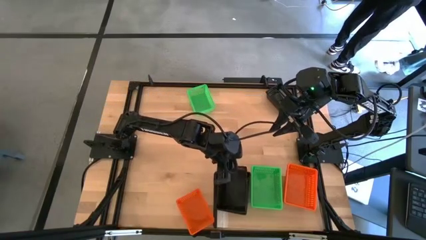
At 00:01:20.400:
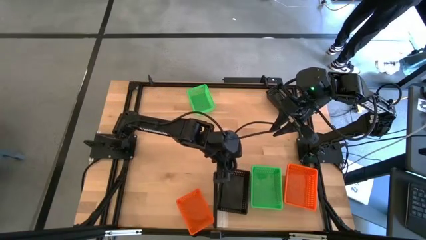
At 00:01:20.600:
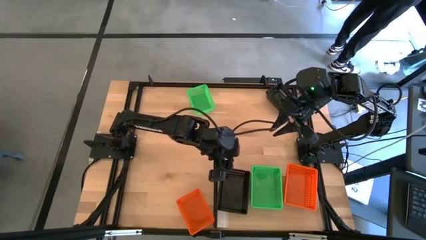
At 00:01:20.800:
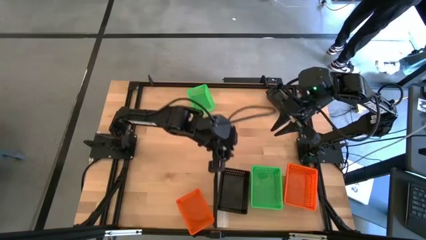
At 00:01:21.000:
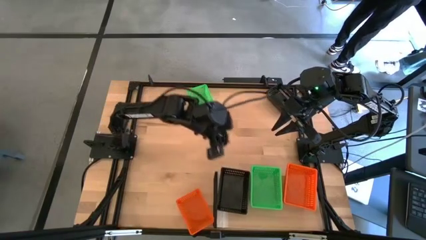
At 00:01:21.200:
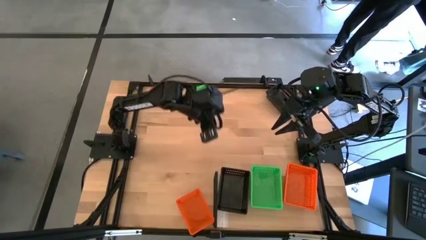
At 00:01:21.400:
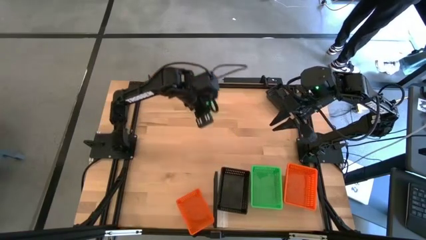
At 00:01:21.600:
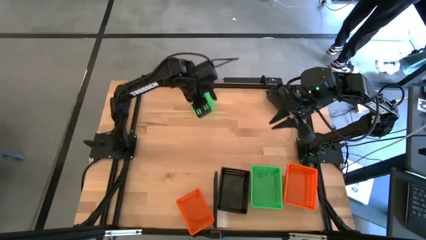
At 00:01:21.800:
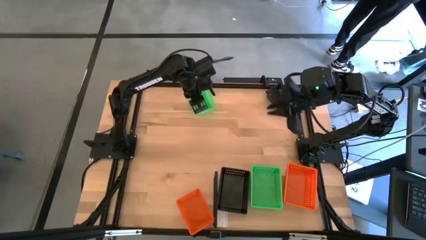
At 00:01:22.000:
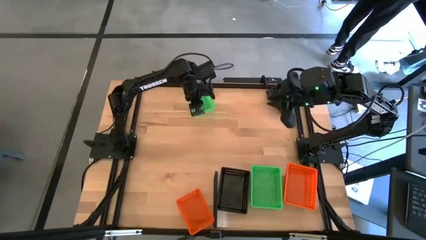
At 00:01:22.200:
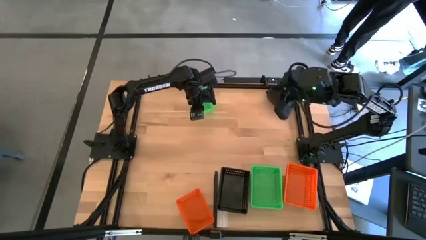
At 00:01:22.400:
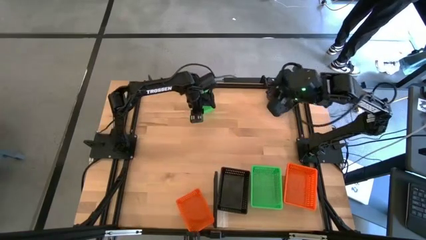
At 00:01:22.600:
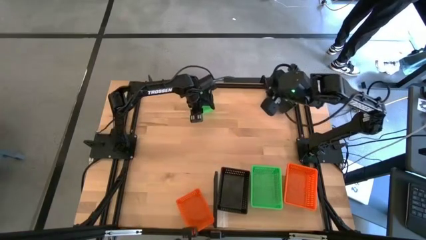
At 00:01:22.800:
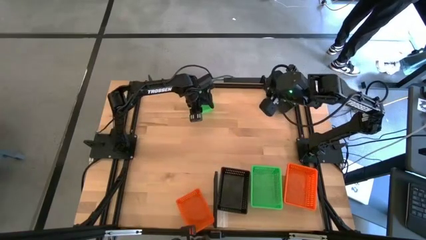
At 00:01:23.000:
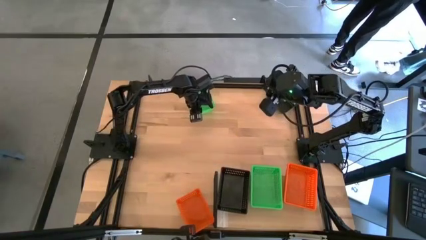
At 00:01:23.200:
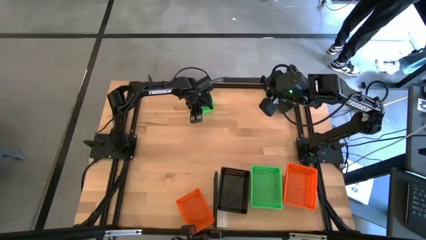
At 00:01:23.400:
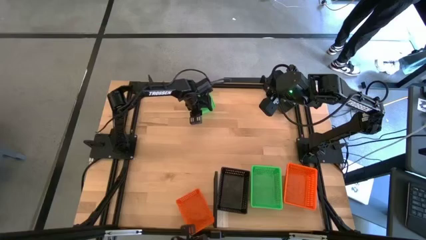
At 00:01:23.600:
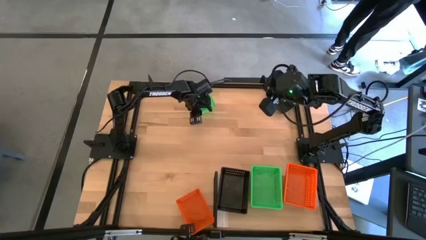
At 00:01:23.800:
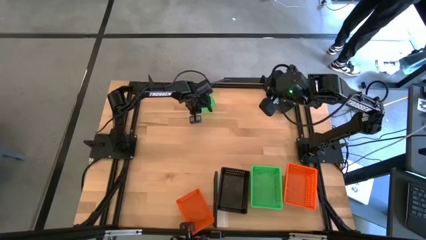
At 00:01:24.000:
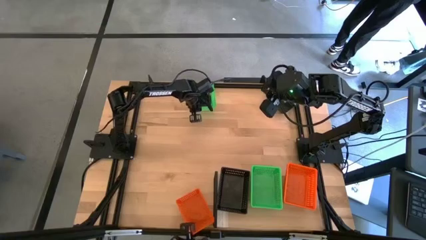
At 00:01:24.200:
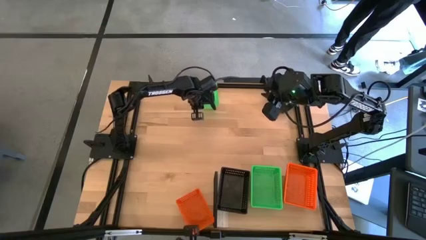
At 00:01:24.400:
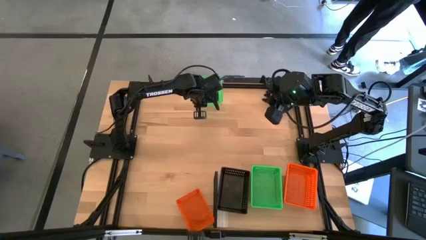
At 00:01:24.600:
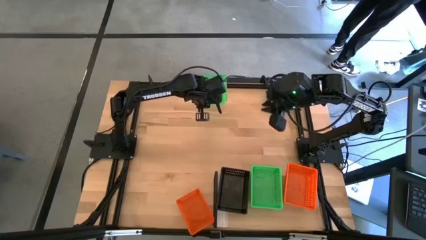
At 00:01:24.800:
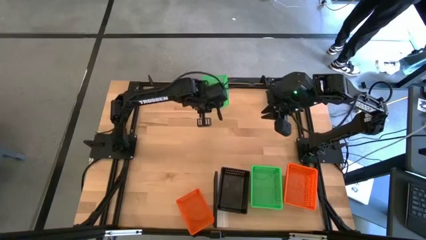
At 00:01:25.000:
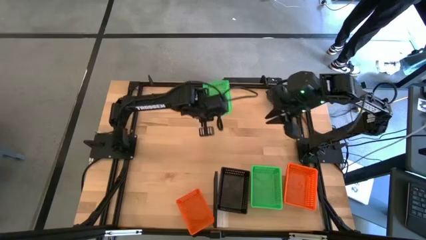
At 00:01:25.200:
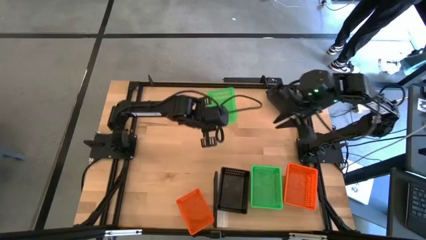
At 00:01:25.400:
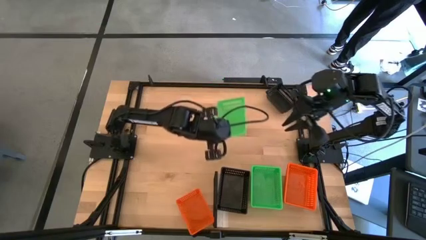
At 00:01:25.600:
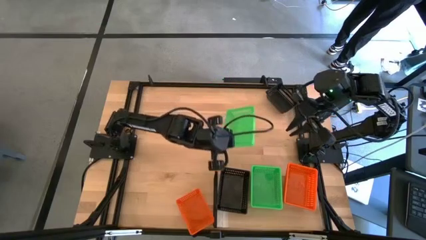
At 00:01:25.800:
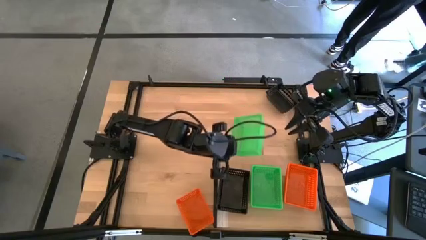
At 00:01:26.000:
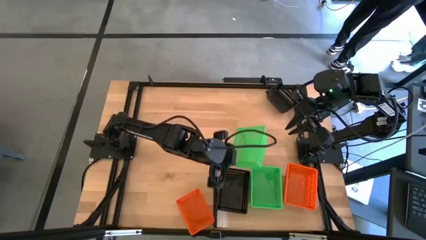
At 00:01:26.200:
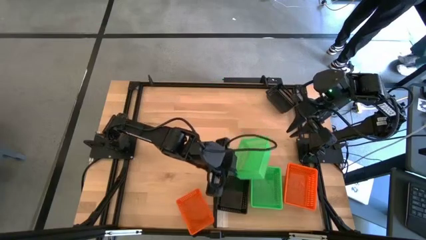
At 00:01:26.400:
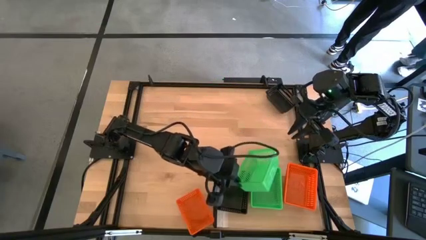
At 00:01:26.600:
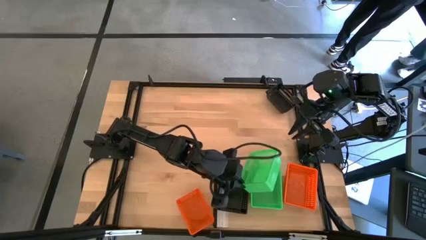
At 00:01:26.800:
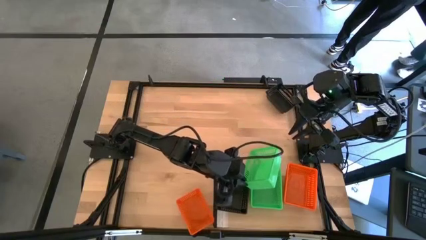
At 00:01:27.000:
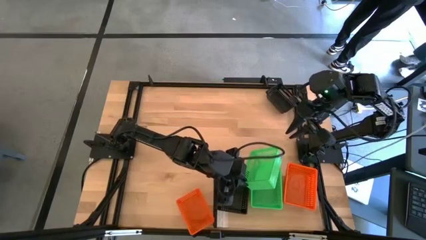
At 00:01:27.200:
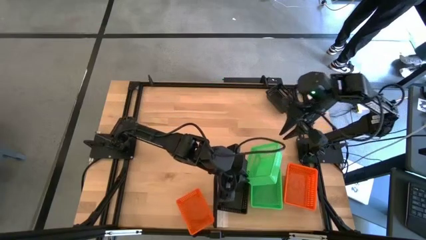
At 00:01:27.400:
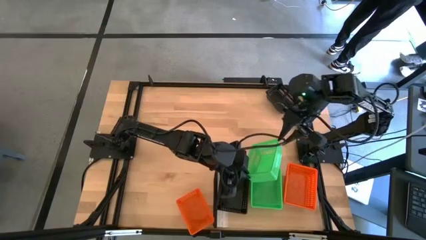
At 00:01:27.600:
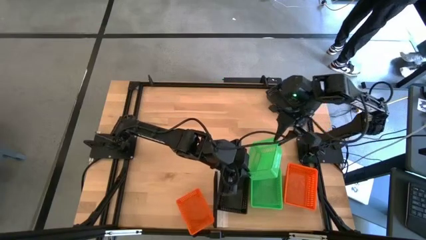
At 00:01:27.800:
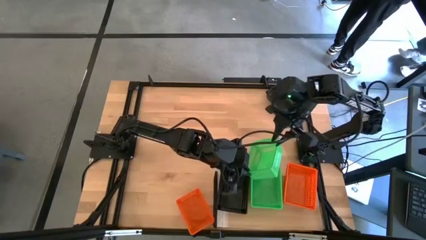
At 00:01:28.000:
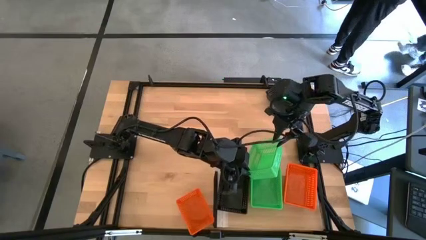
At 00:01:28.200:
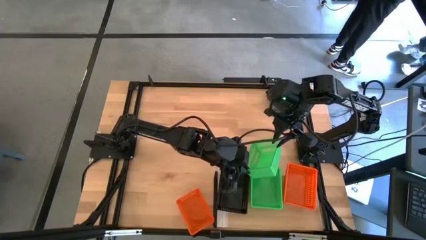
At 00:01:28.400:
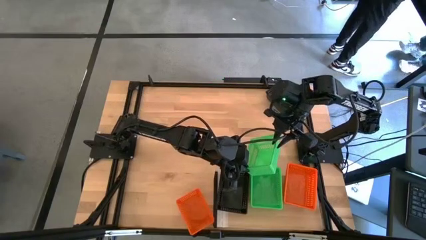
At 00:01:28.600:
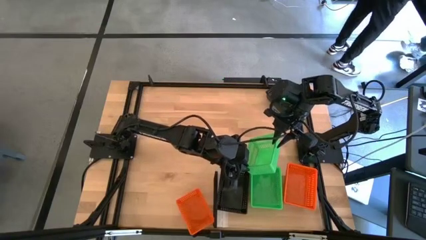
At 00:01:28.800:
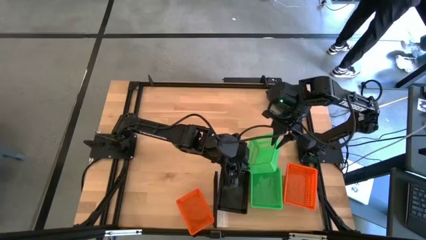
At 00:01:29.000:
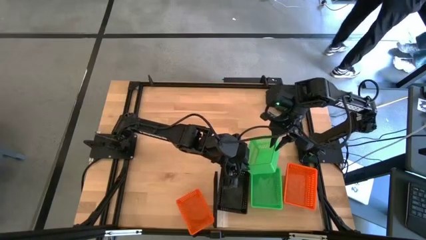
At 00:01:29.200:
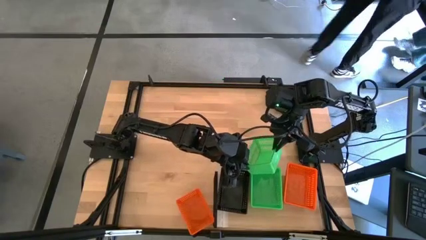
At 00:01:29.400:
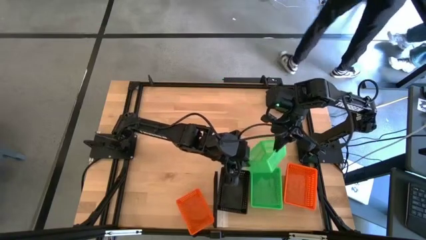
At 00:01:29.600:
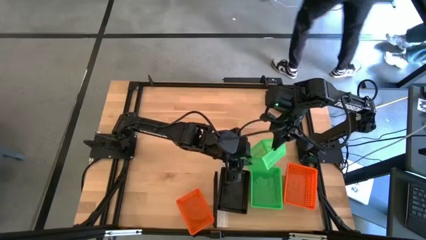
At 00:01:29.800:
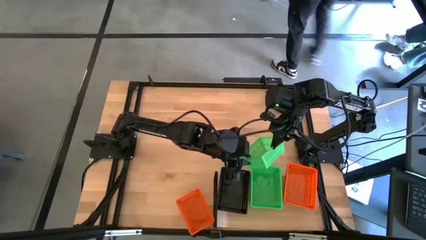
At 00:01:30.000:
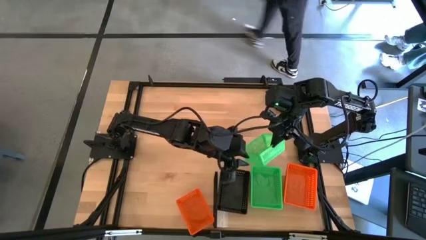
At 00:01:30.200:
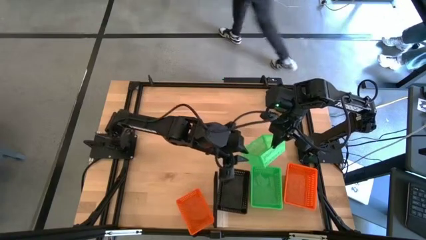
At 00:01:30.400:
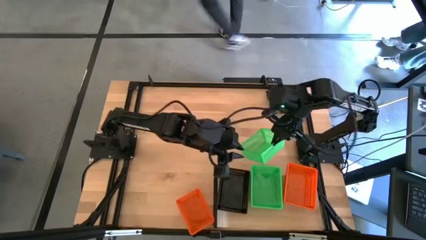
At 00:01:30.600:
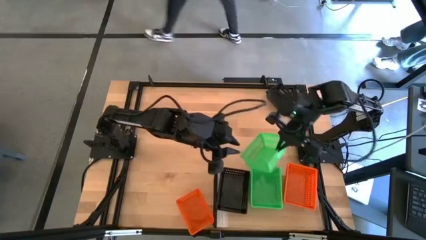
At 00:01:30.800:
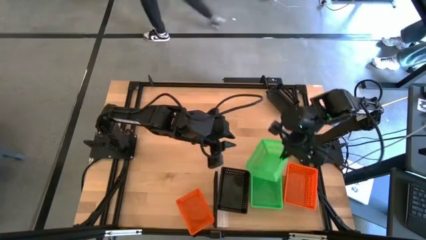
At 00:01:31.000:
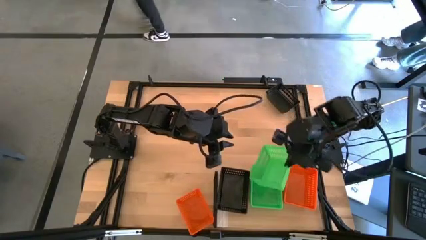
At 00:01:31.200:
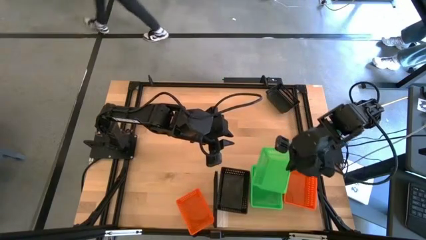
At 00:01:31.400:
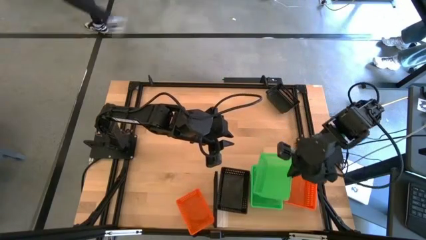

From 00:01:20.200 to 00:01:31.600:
Task: Stack baskets on shelf by color
Stack the green bin on the stacked green bins on the shelf

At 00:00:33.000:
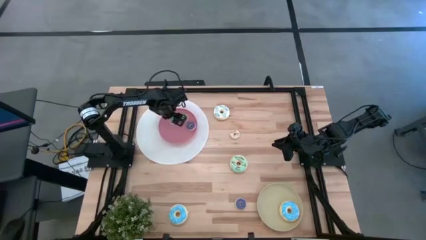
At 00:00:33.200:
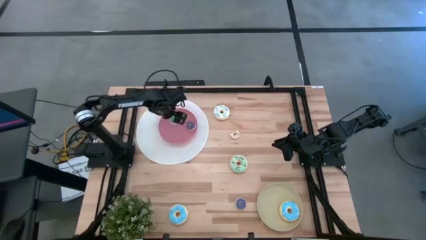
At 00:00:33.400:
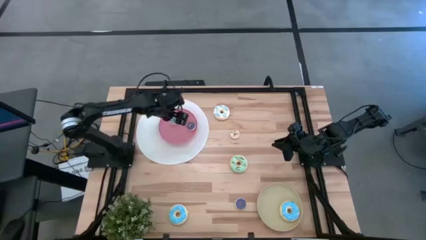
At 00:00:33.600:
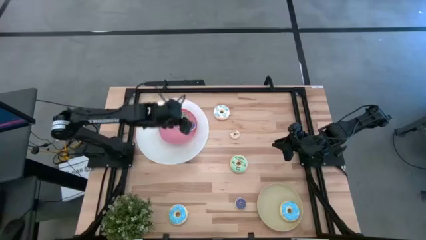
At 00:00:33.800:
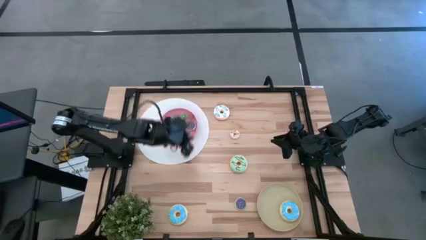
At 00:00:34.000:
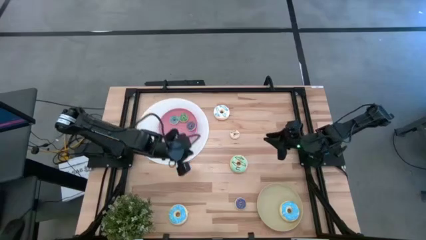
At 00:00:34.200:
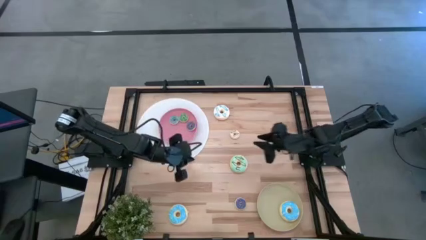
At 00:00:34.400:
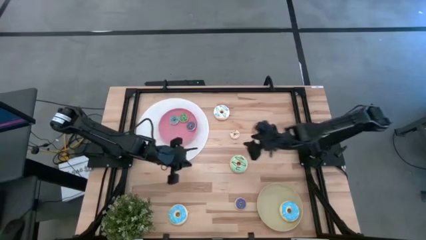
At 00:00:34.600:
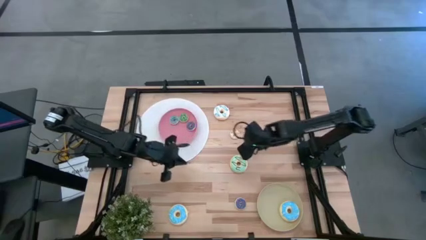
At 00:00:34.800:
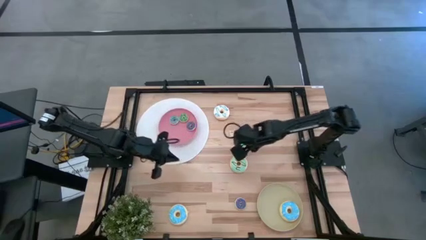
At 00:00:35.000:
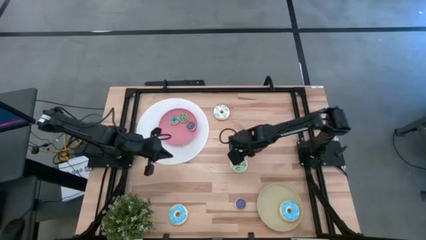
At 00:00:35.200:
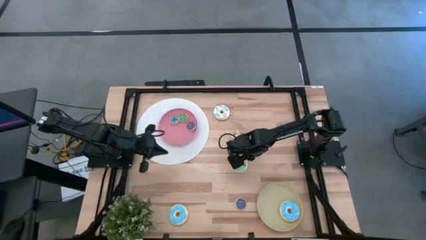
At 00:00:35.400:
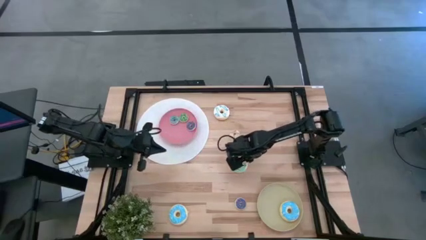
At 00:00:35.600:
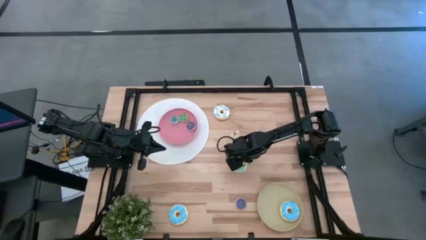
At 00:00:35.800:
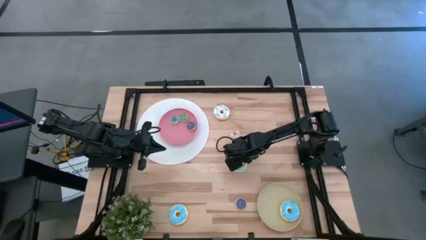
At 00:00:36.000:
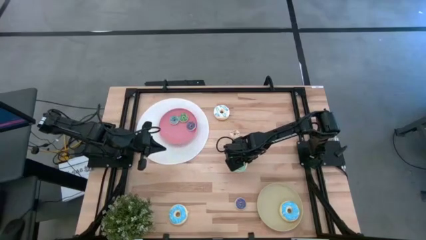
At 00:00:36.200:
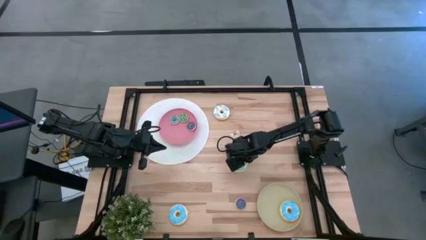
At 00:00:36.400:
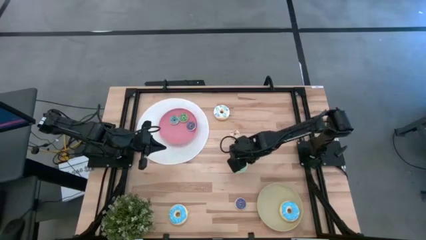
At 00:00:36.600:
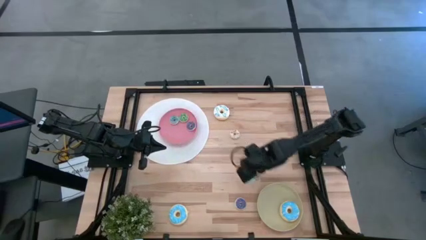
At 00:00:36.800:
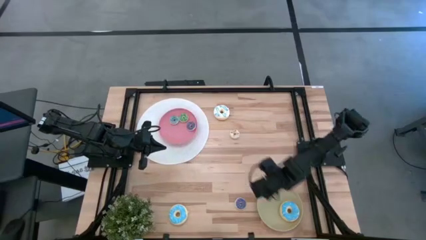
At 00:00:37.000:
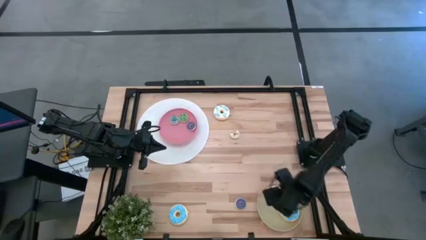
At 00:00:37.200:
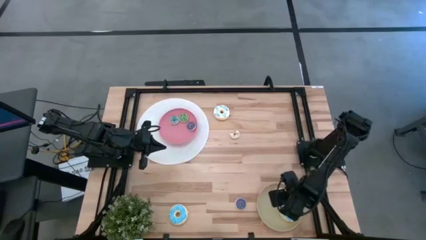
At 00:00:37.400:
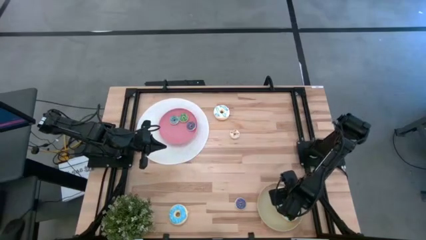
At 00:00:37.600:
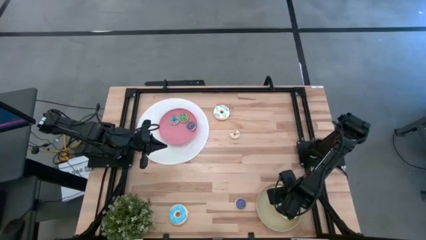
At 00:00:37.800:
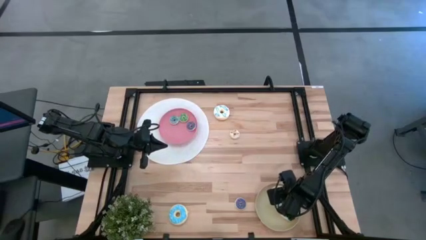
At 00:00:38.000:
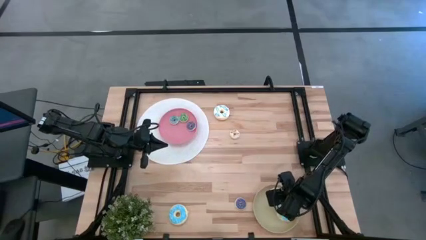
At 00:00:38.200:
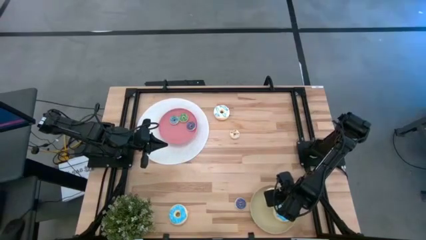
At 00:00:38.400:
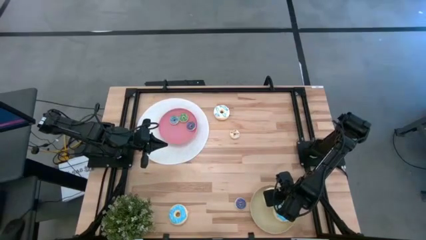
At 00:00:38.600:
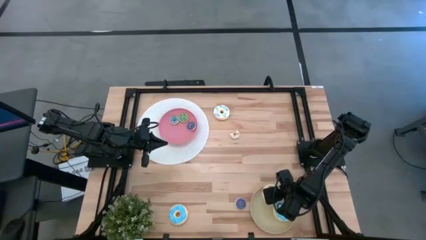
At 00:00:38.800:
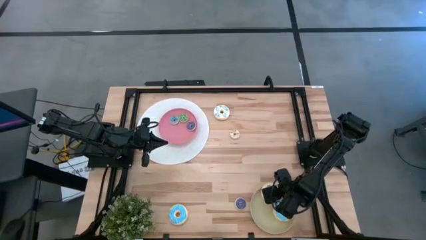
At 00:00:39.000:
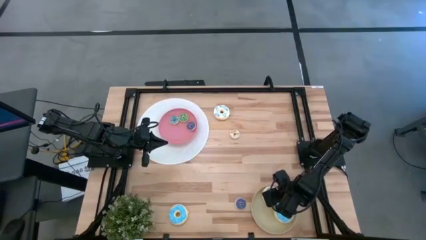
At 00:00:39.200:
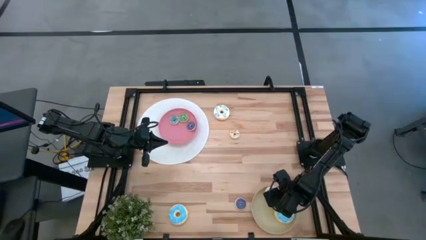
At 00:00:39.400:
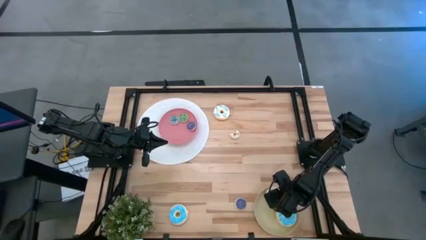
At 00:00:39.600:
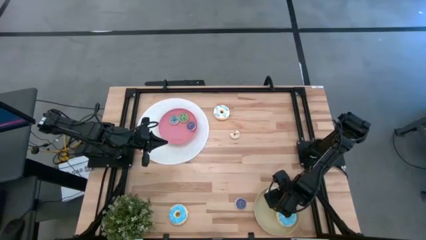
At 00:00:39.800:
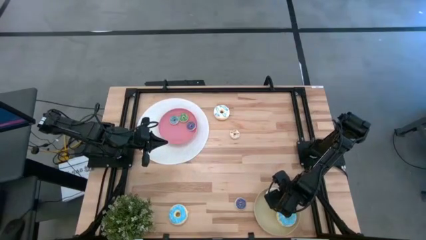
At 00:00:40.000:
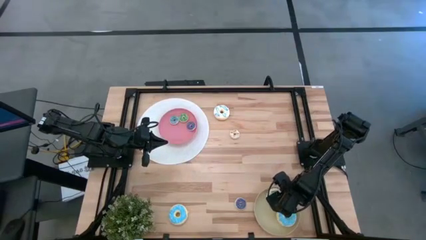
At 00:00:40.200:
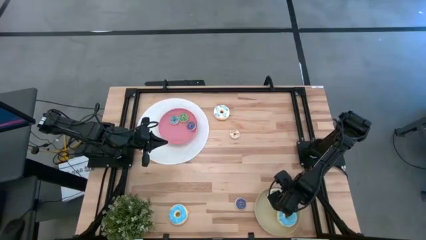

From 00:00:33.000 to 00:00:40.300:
Task: Pick & Place donuts
Put the large light blue donut on the brown plate
